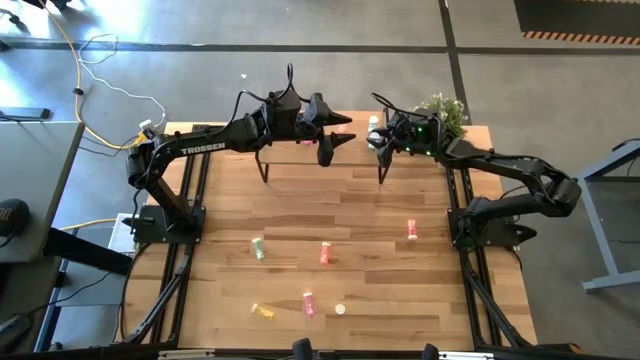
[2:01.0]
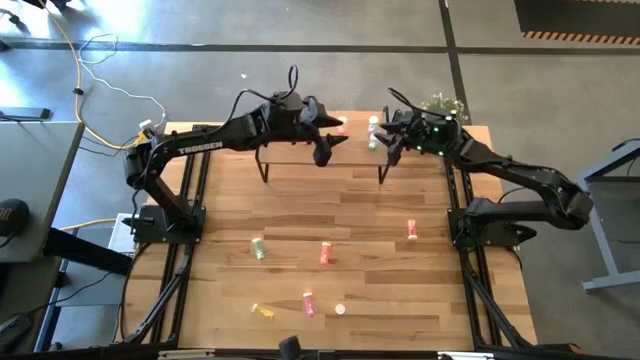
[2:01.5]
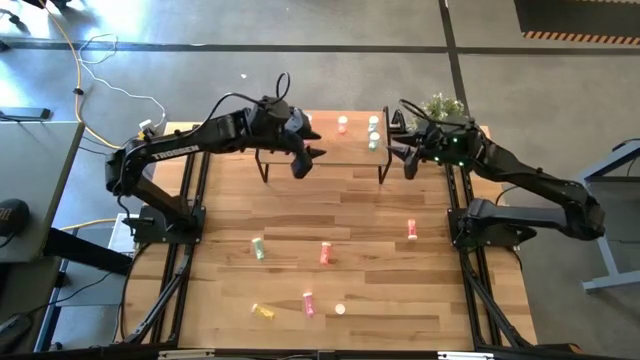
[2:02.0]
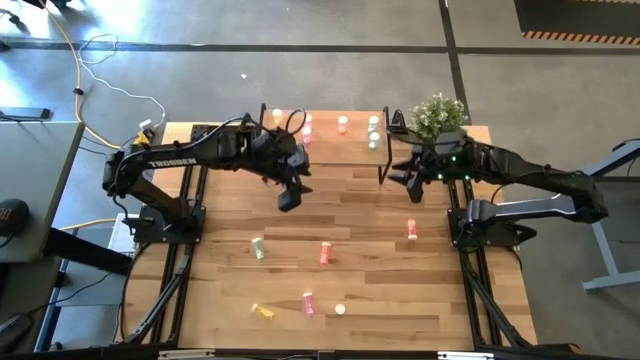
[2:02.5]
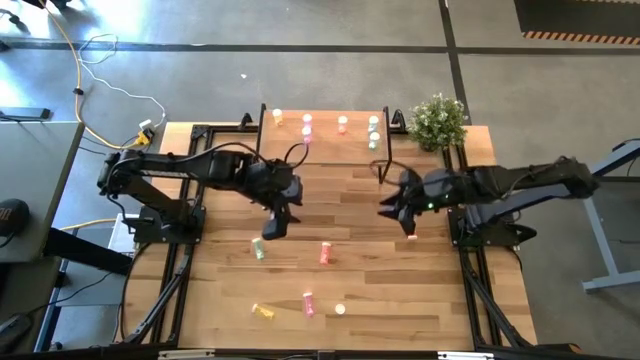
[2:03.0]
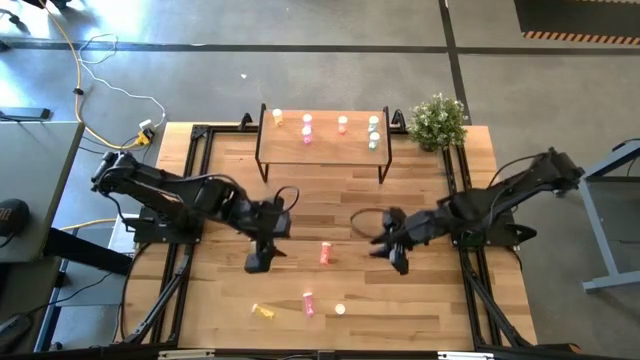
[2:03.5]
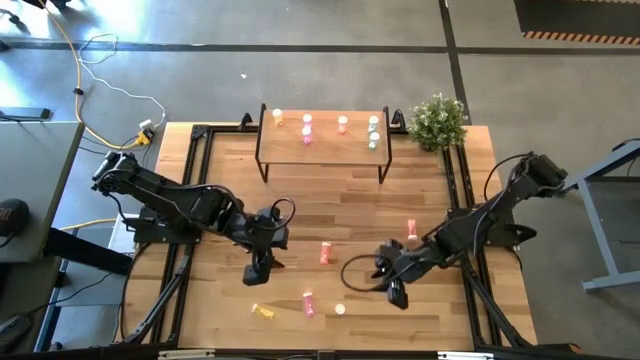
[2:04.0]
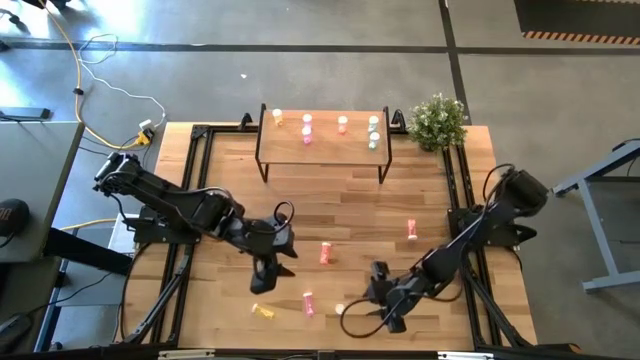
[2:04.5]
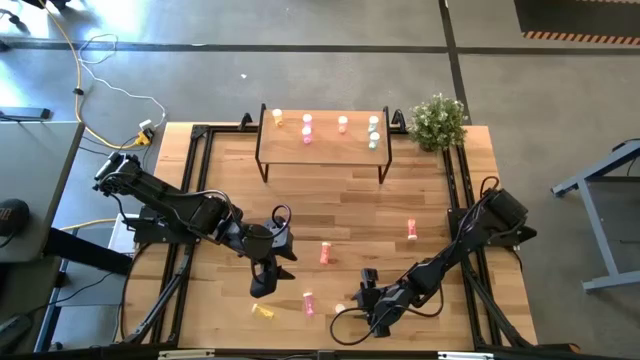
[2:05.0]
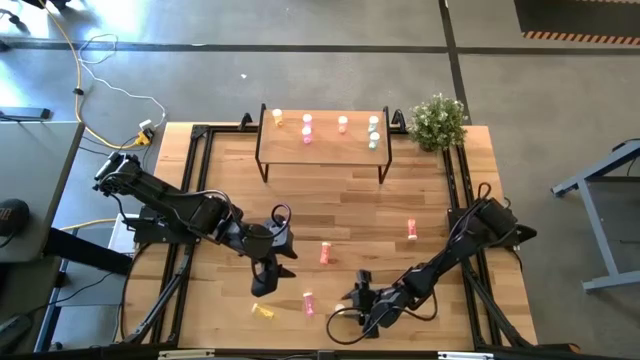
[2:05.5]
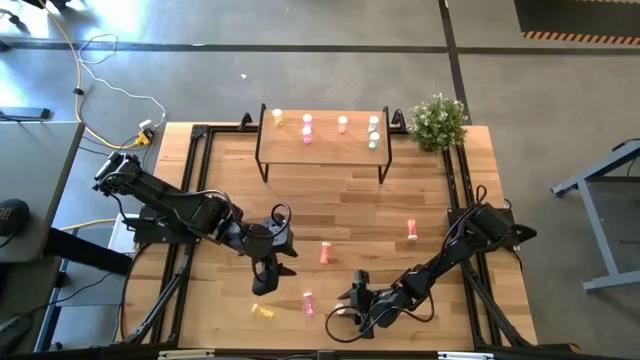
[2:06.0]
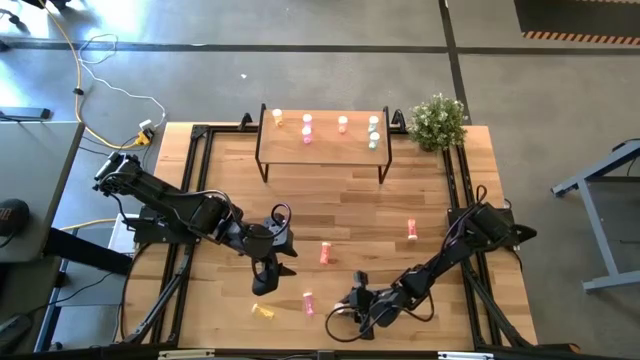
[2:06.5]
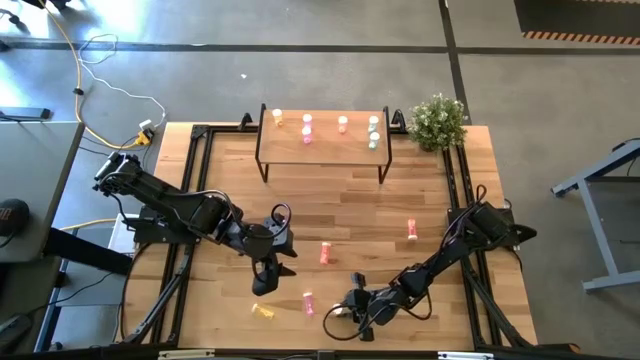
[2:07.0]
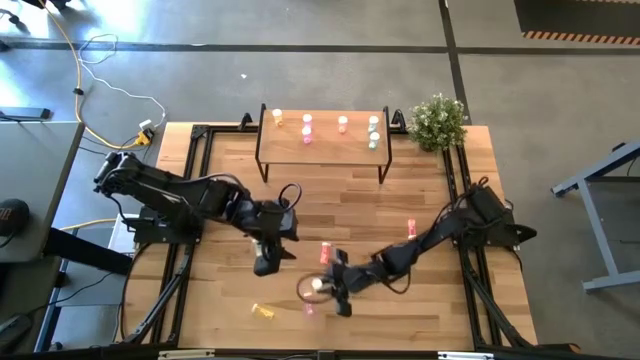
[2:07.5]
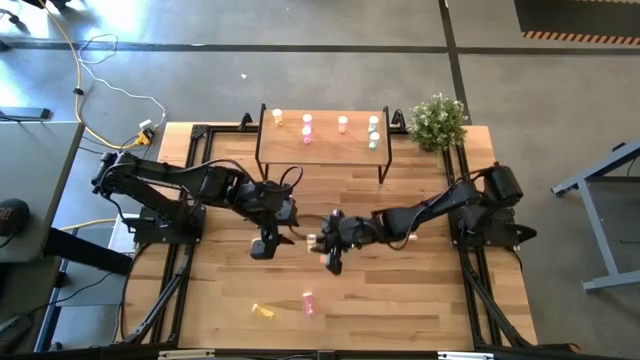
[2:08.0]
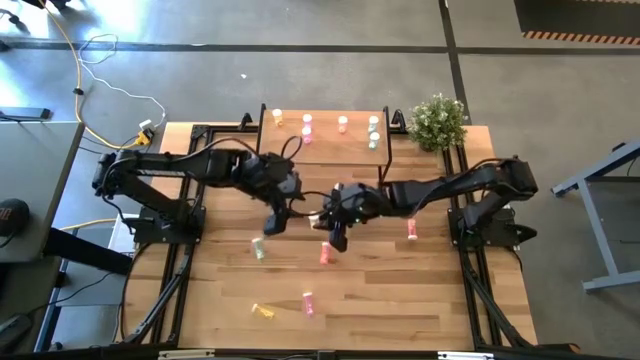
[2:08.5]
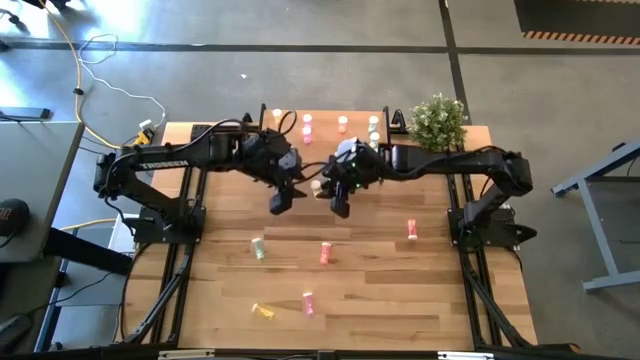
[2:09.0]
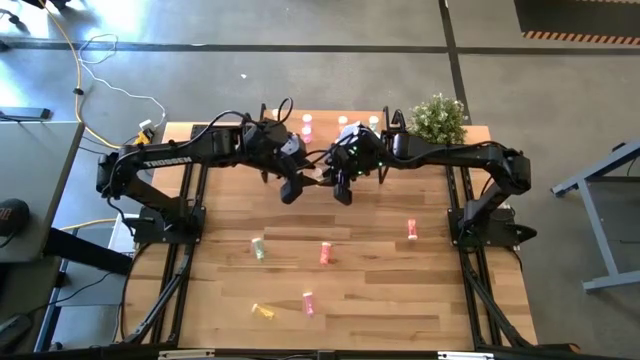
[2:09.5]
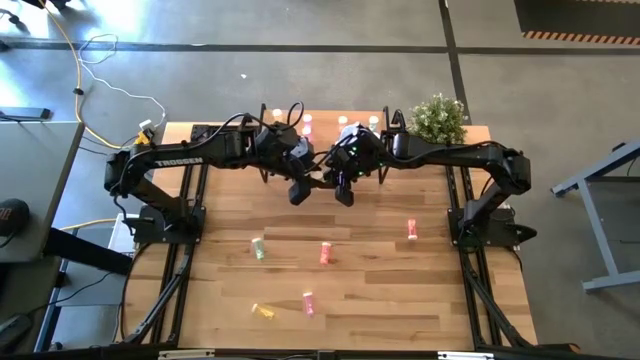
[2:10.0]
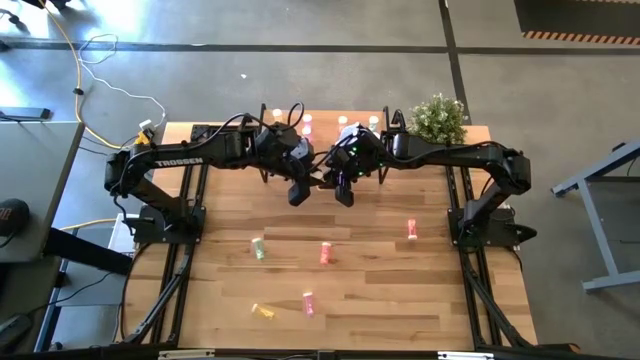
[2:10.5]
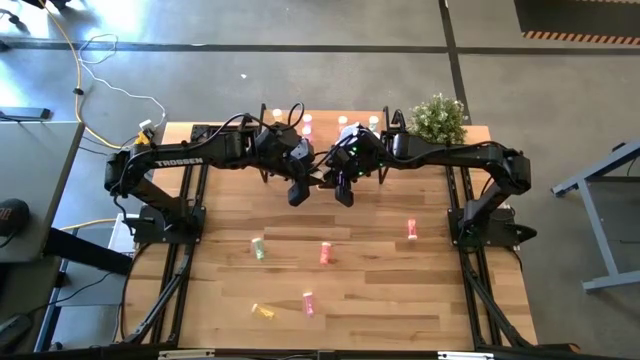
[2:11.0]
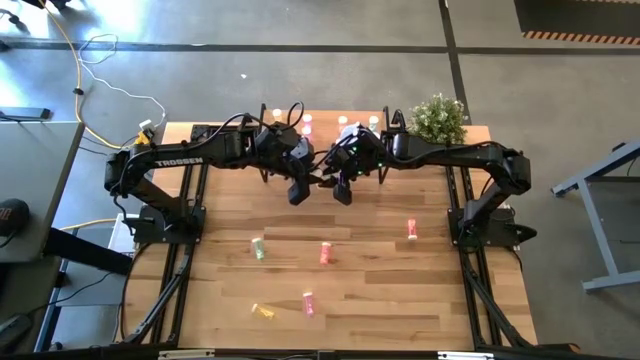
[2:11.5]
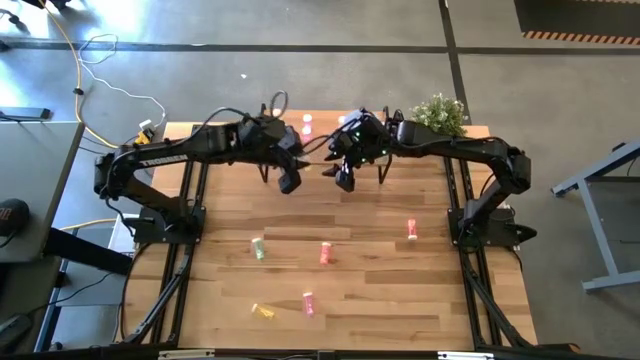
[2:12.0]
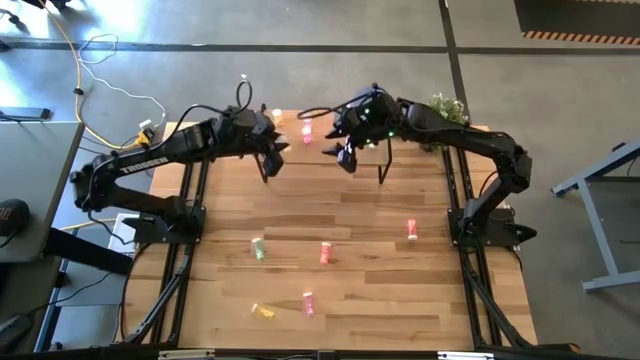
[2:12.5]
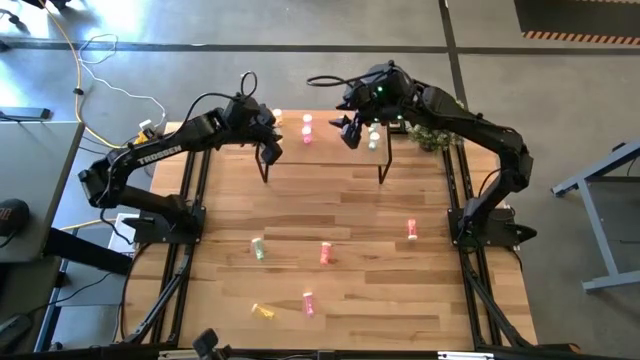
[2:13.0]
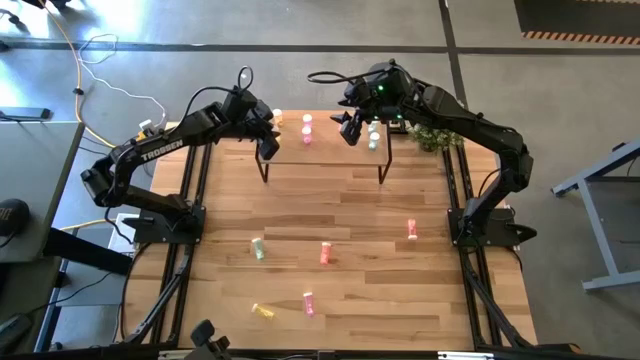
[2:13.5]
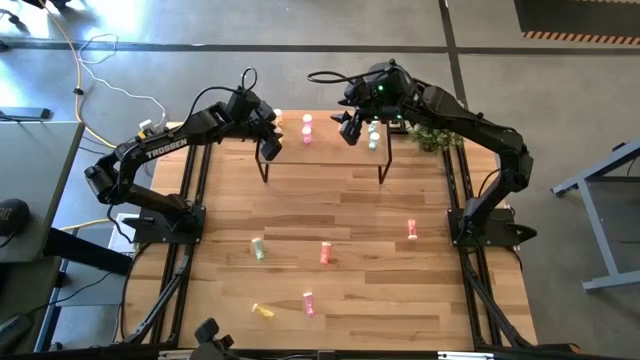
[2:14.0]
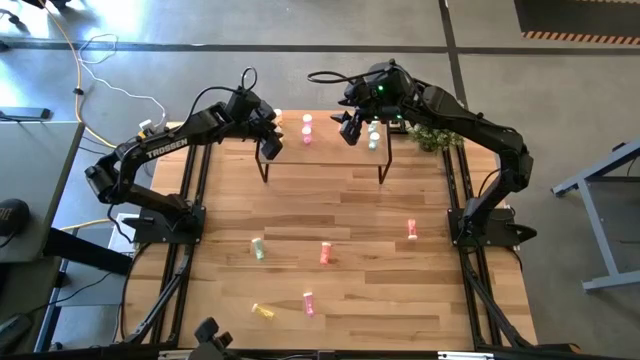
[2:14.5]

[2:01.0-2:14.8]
Task: Pick and place medicine bottles onto shelf by color
Put the right yellow pill bottle on the shelf aligned with other yellow pill bottles
